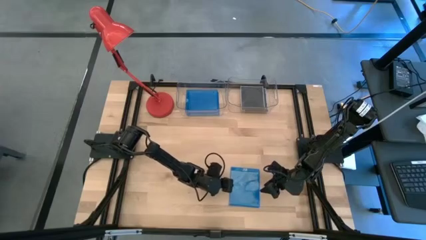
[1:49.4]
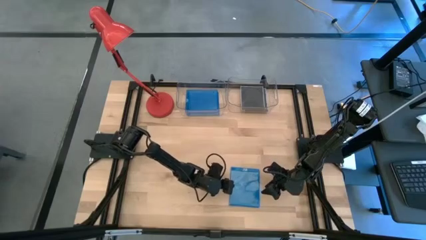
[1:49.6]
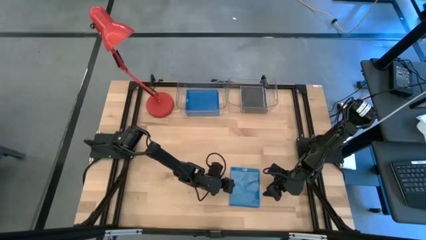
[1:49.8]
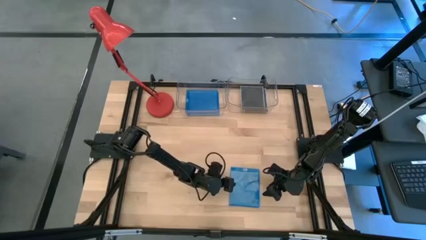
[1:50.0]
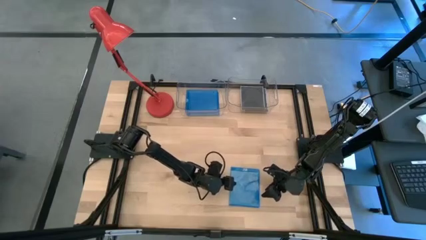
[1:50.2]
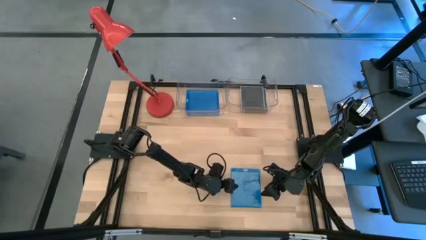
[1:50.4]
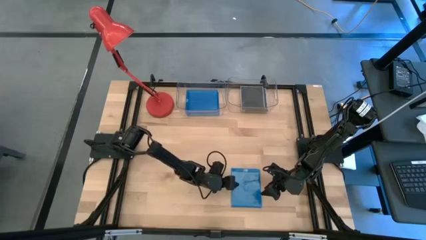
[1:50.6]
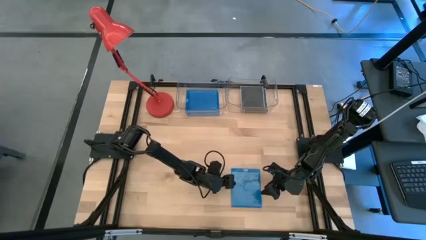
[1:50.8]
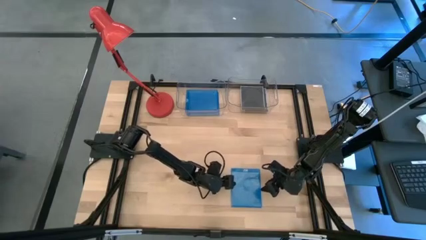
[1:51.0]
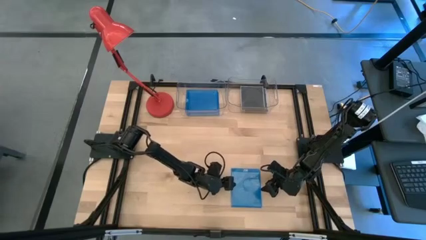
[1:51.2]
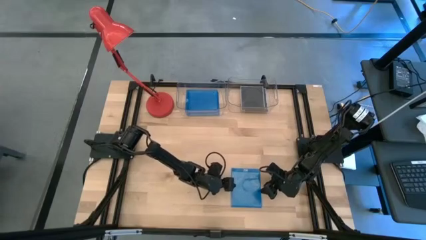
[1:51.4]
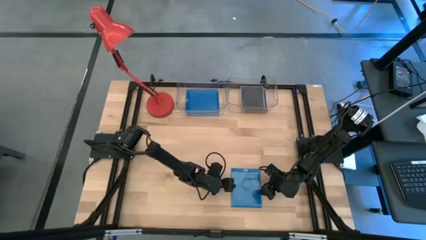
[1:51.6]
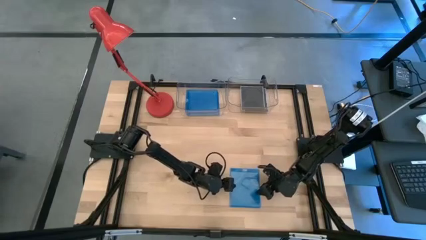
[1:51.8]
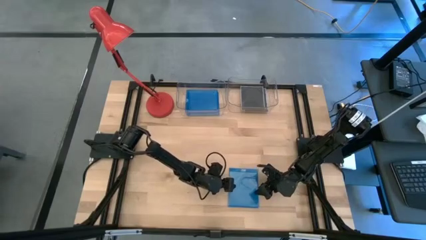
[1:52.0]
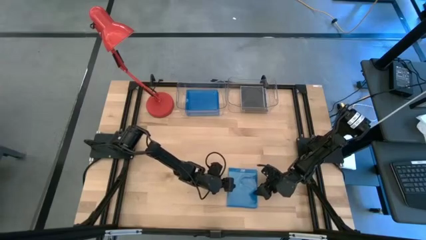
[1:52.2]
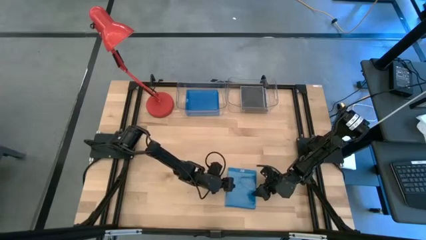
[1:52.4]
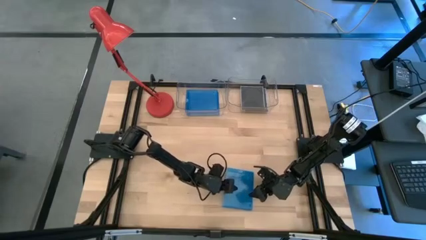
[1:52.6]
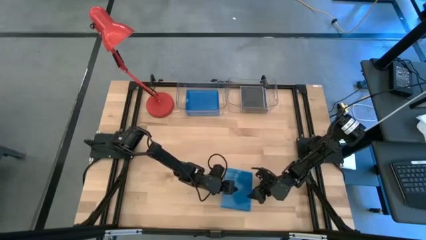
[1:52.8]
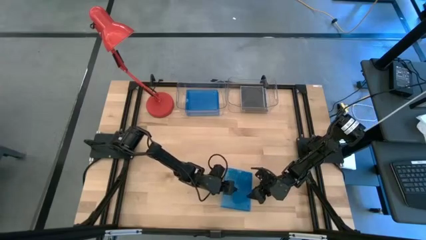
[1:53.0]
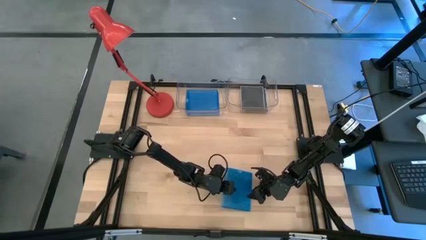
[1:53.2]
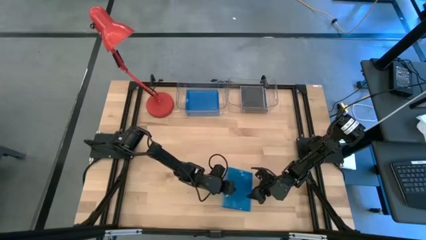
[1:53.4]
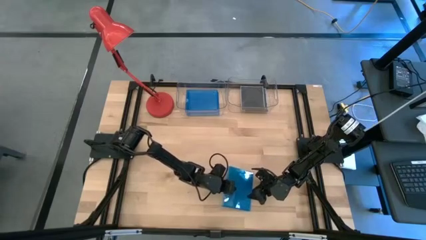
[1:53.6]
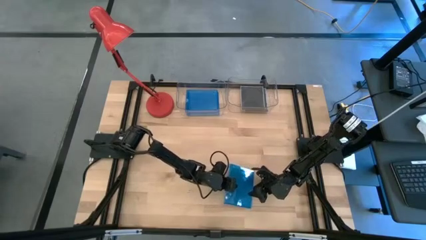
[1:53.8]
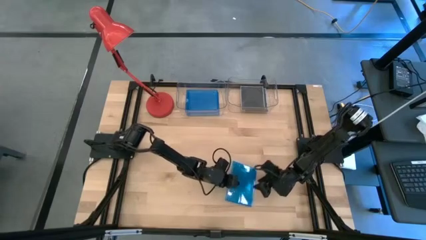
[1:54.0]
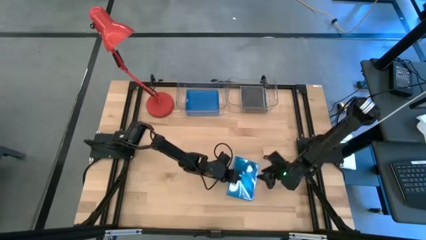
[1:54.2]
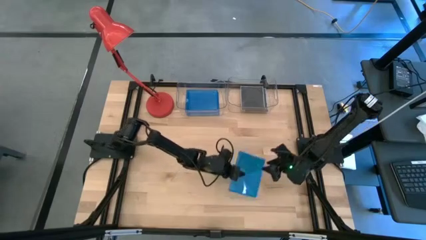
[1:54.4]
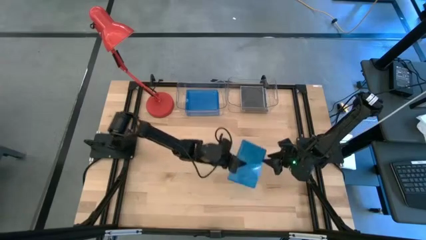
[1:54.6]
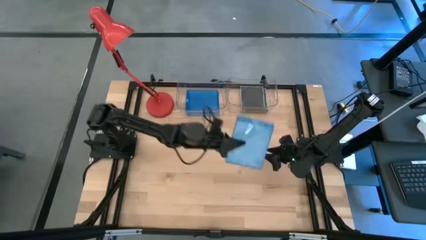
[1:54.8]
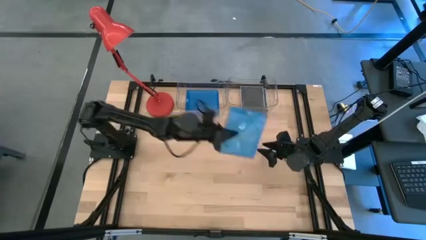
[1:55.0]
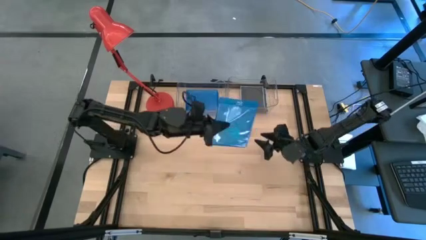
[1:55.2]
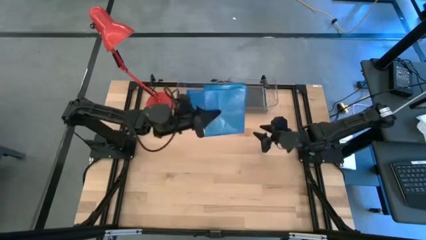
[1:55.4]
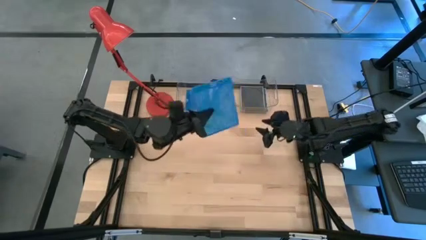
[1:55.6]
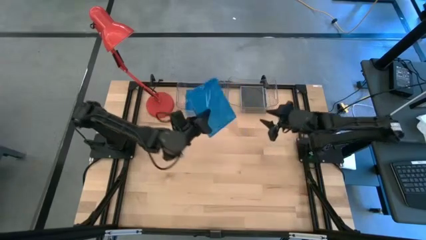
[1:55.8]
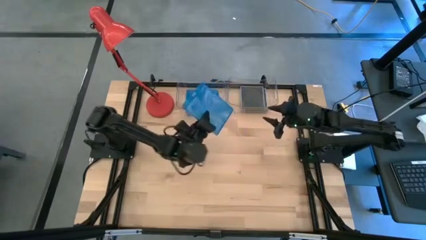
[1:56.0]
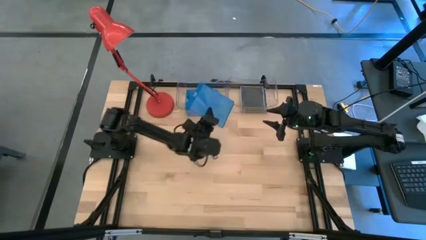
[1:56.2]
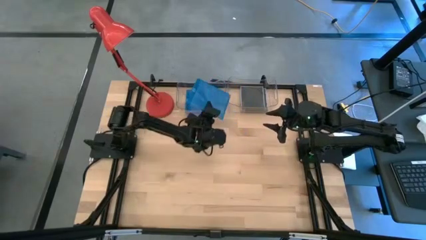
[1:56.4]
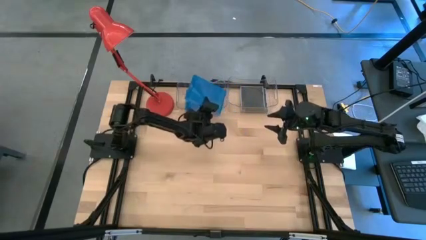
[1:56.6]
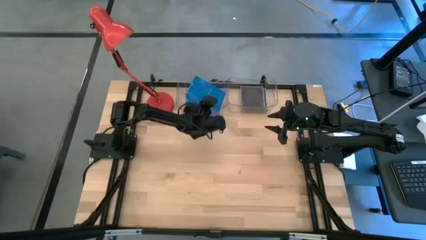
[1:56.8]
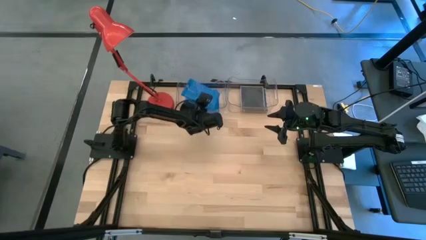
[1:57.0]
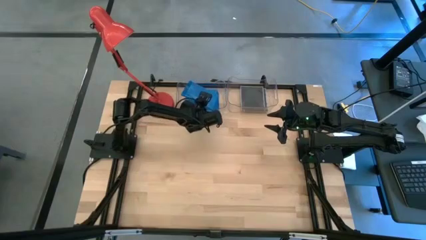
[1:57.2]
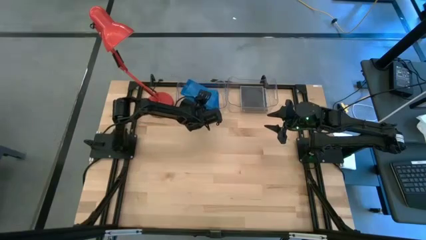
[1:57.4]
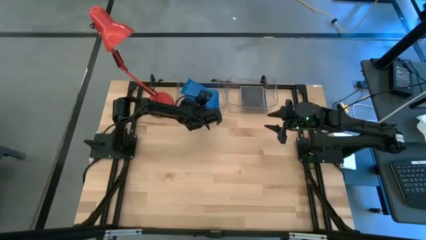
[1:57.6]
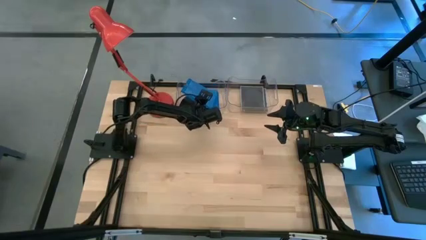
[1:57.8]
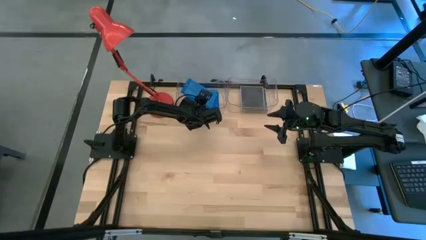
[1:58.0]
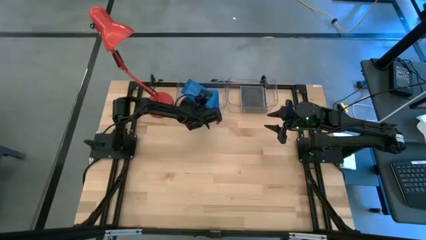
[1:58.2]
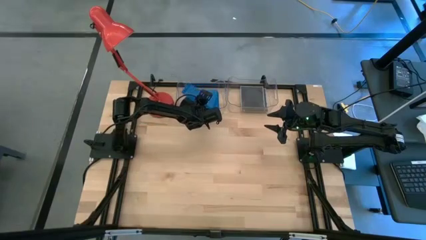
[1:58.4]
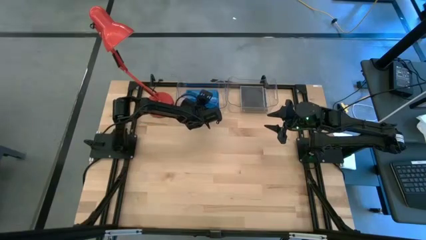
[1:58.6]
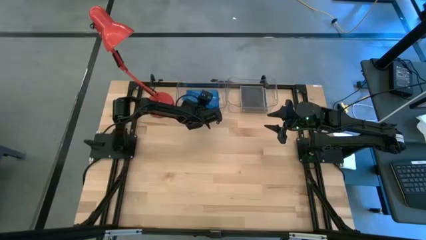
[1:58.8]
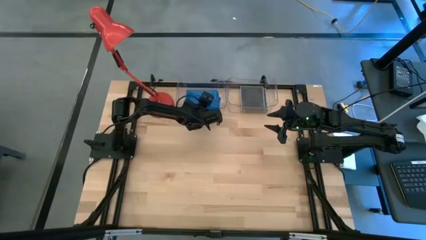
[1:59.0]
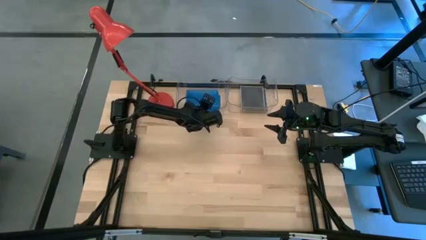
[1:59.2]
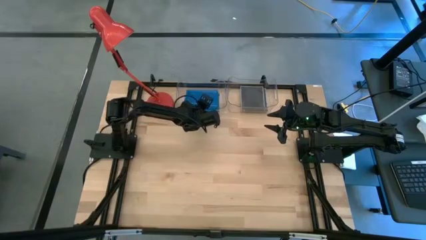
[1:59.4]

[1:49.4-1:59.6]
Task: Pick & place jewel cases by type
Put the blue cd case into the left transparent bin

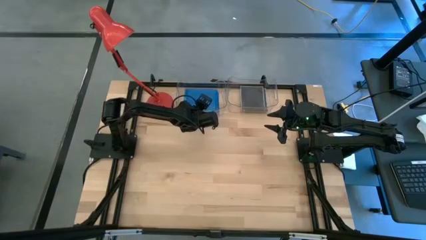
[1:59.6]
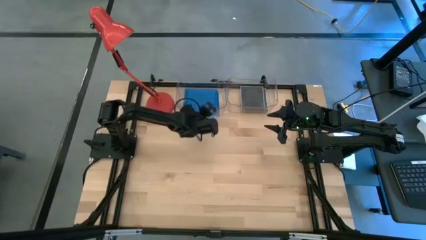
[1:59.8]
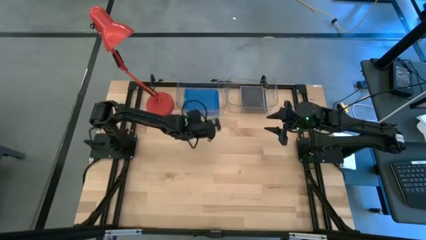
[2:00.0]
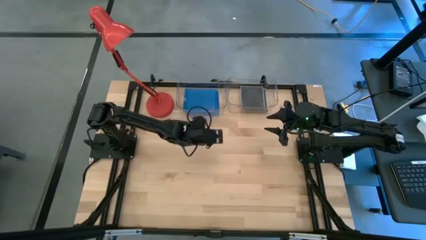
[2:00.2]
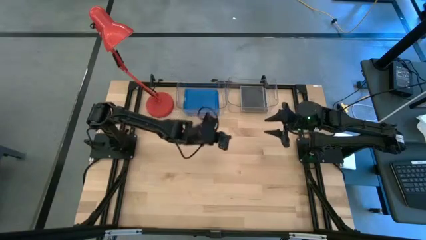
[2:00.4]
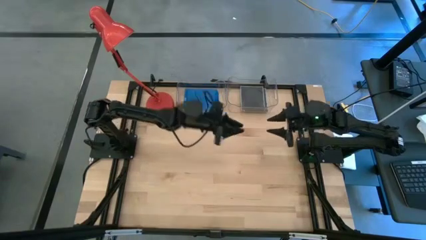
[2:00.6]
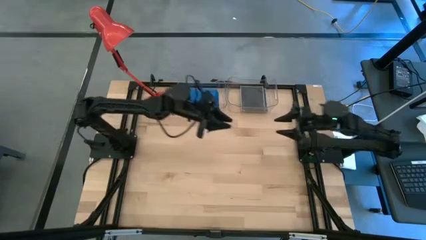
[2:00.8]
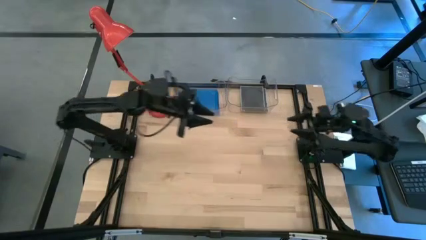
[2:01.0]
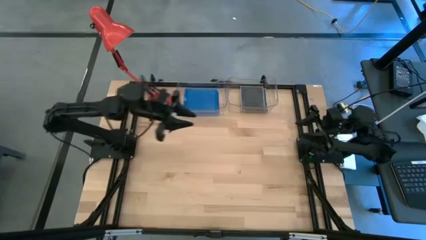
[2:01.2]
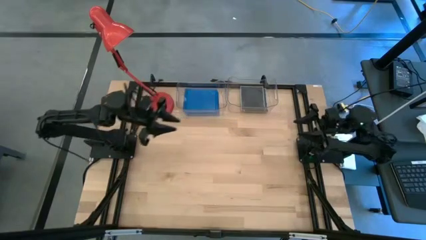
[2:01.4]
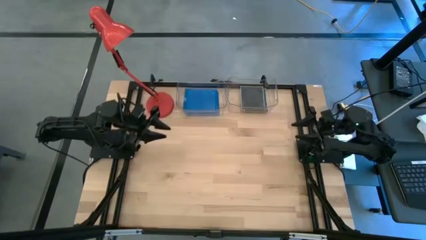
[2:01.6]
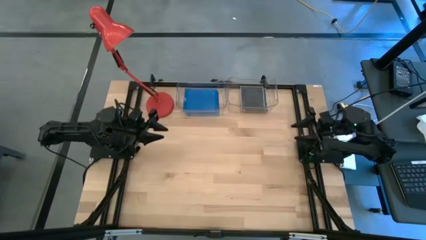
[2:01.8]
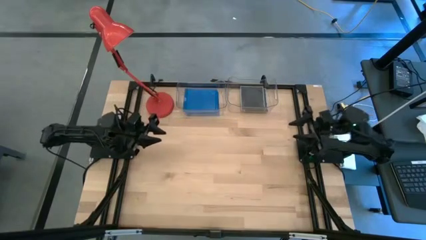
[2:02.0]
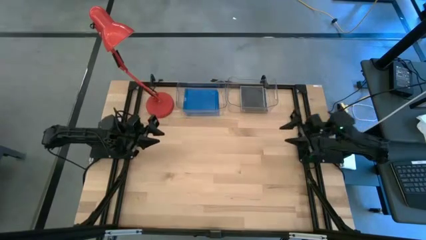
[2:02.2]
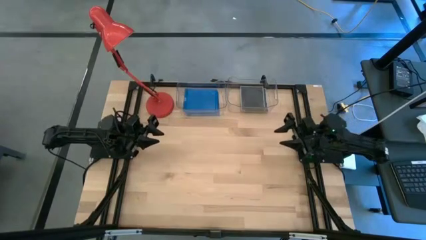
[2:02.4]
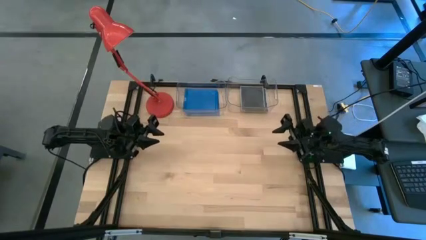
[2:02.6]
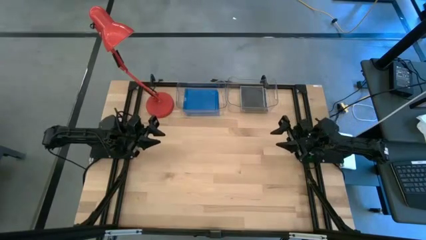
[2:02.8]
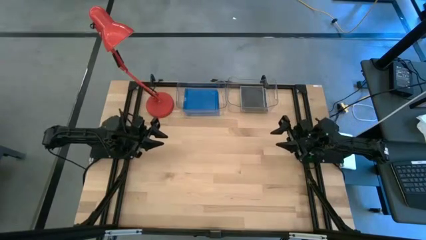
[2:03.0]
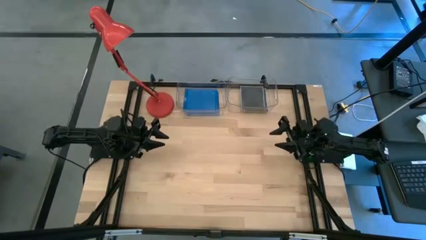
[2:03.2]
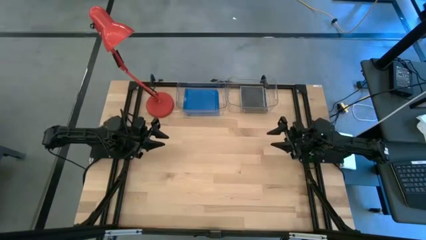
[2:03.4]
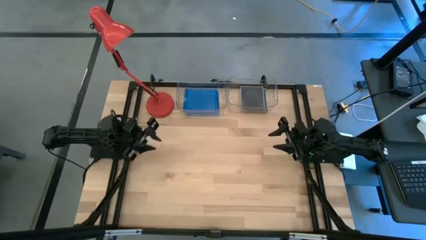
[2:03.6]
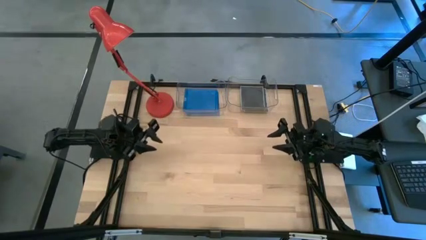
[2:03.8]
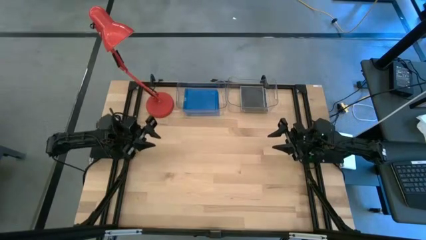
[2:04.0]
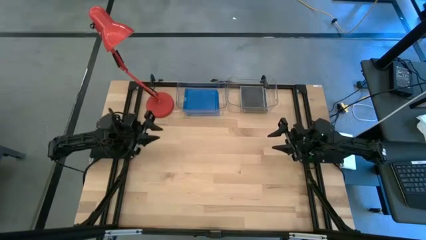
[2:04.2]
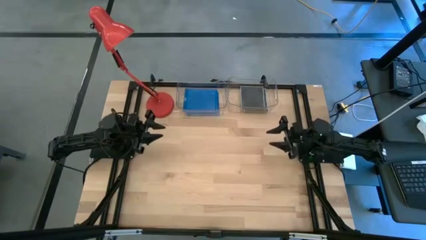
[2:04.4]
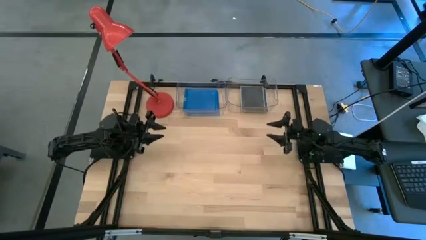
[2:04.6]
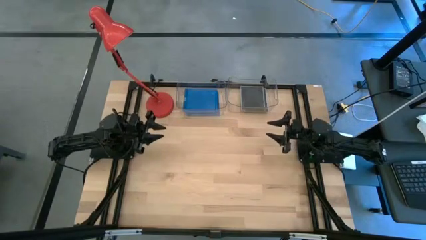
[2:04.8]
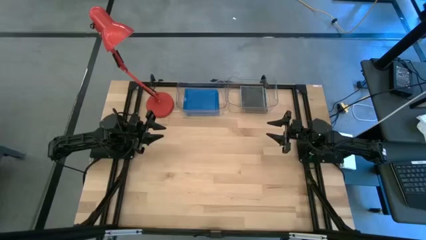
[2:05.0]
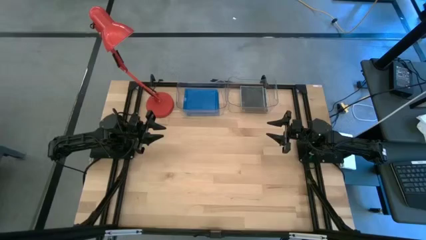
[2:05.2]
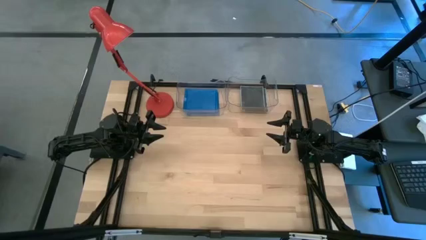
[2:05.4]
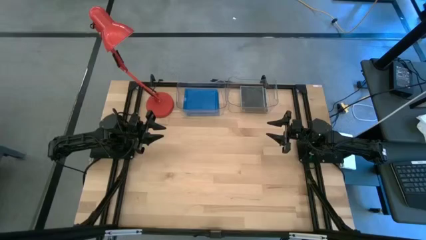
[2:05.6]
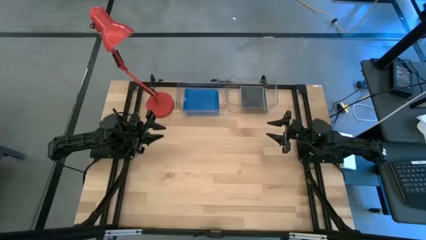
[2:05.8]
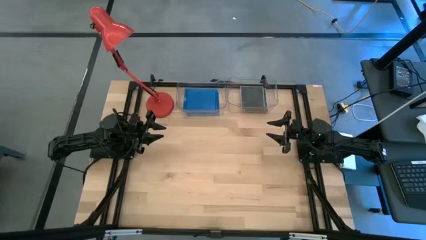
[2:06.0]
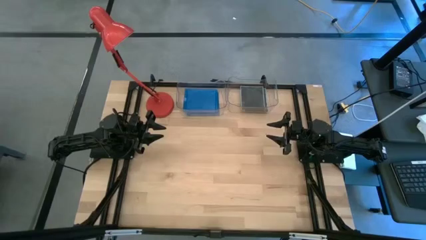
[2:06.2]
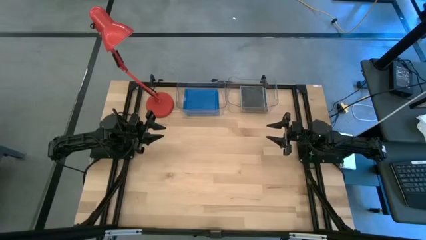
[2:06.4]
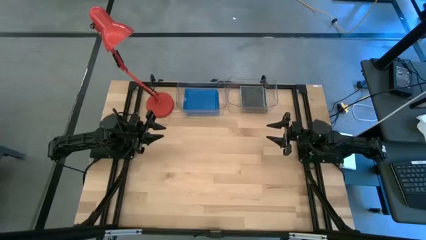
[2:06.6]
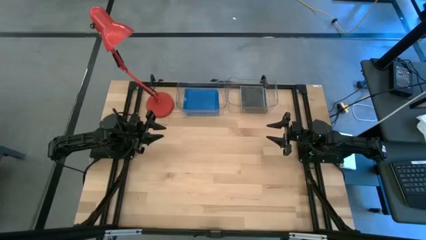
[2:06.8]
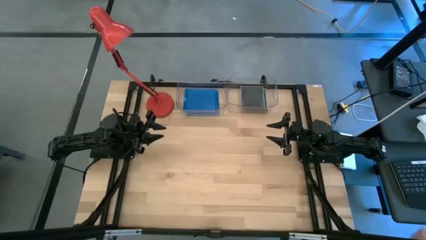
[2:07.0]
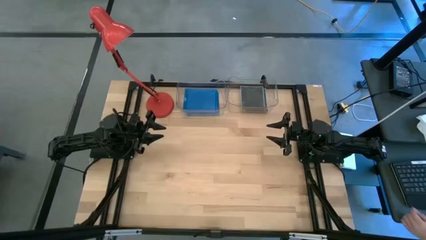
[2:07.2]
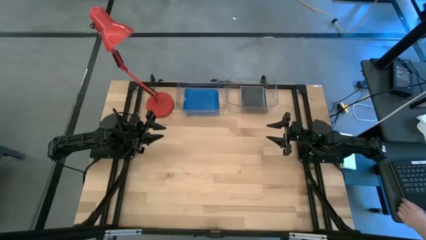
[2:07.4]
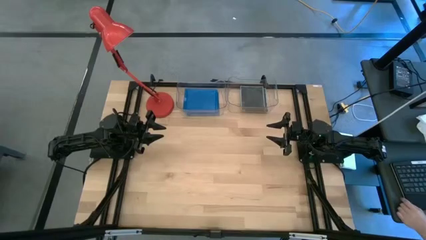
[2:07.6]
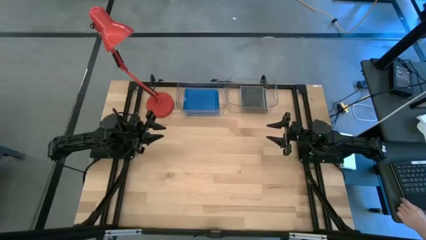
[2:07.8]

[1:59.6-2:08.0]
Return to Home Position
